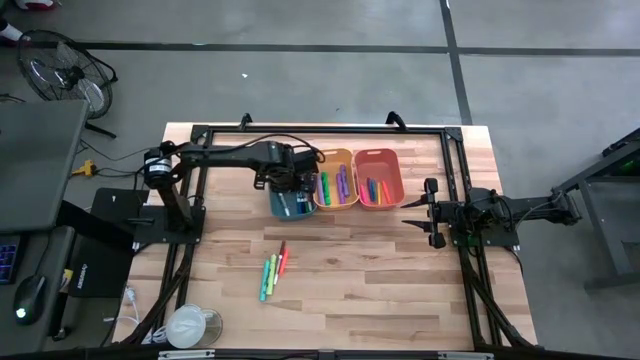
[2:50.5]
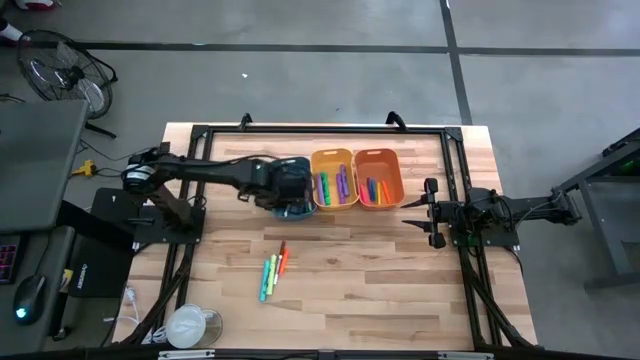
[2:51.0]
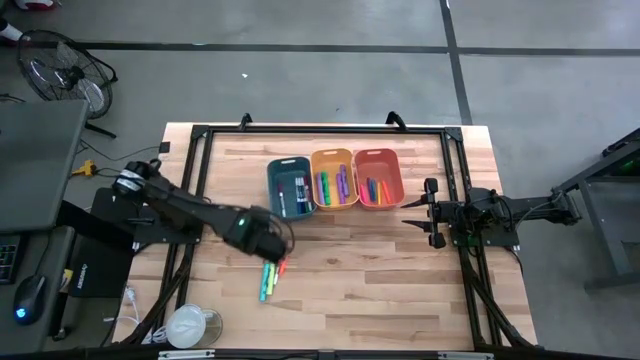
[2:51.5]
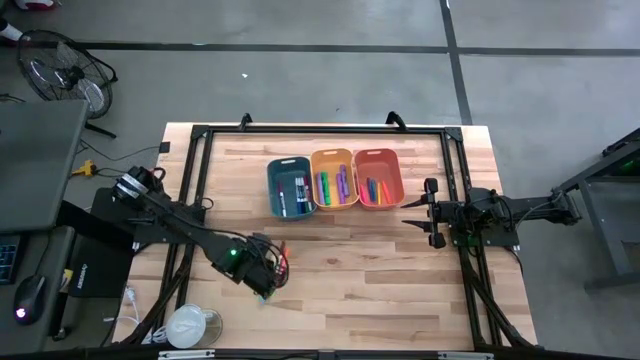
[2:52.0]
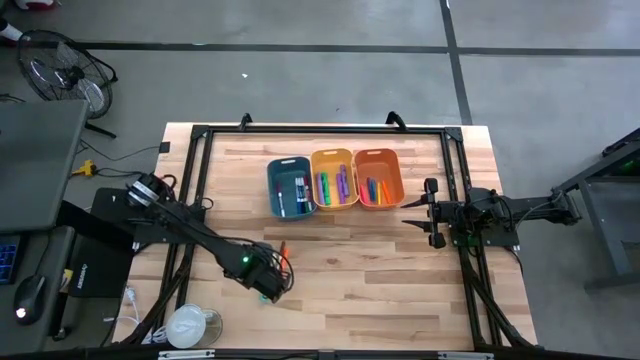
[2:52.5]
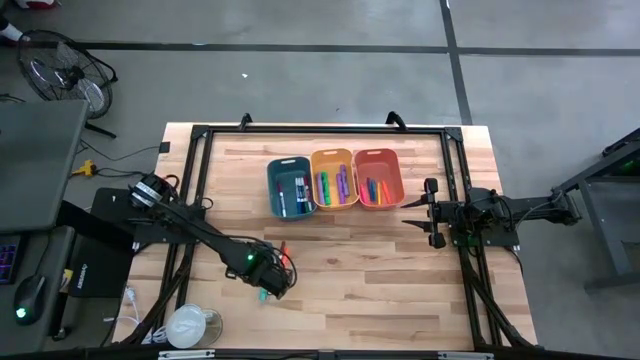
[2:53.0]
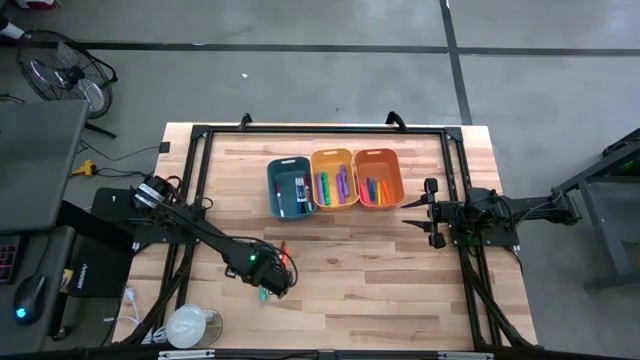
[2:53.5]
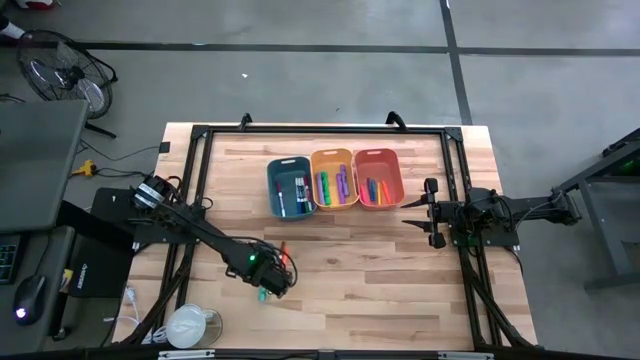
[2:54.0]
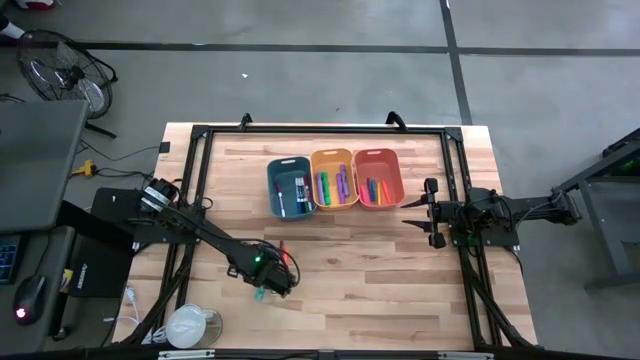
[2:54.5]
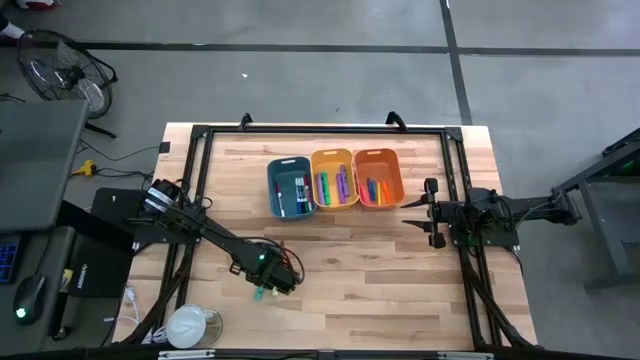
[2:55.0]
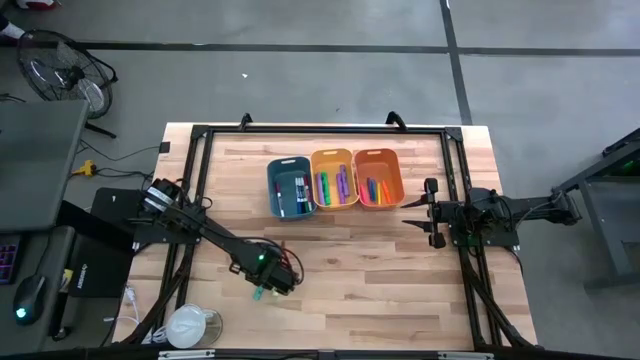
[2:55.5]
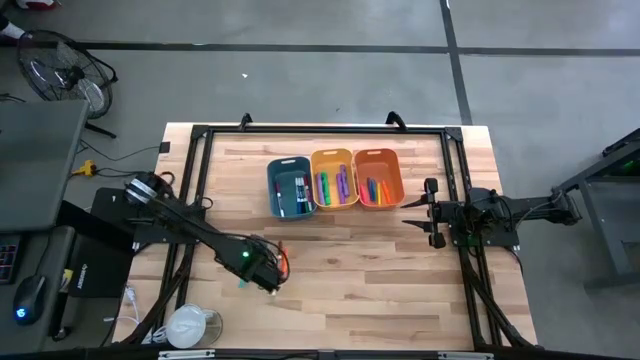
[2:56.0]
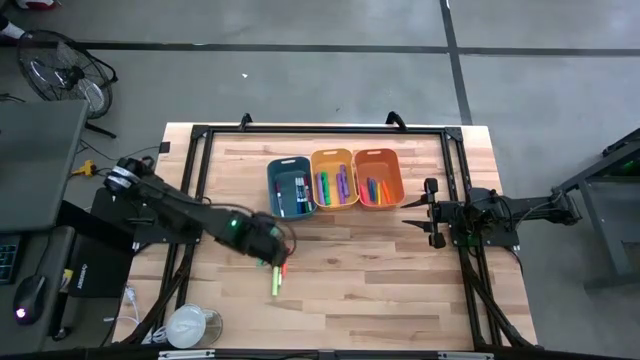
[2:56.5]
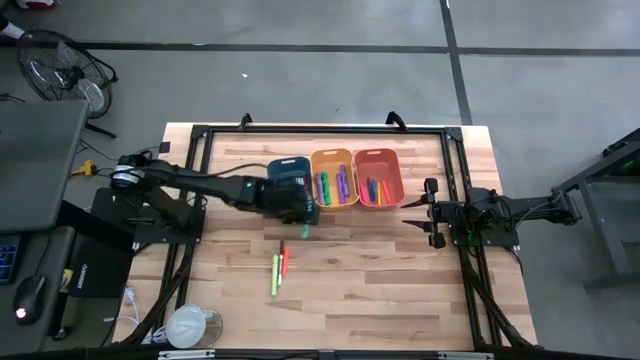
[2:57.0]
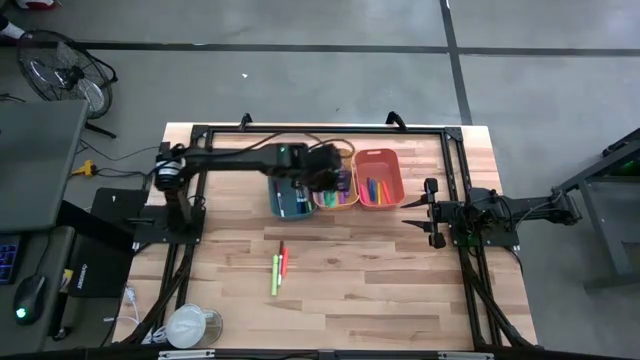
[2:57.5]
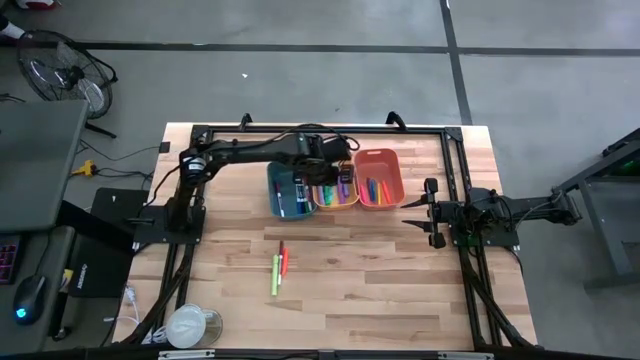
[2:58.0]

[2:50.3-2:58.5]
Task: Pick & Place Markers
Put the blue highlighter pen into the yellow bin

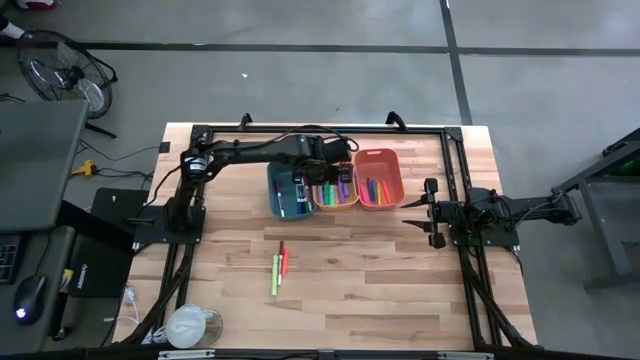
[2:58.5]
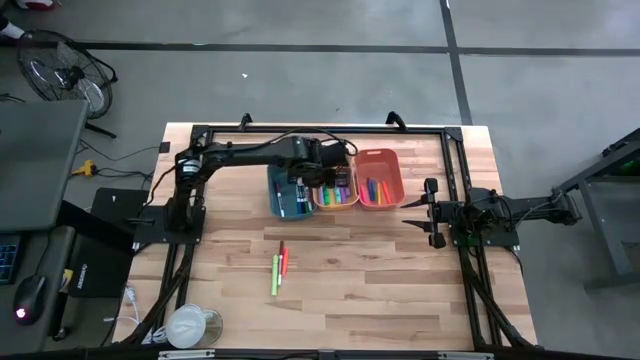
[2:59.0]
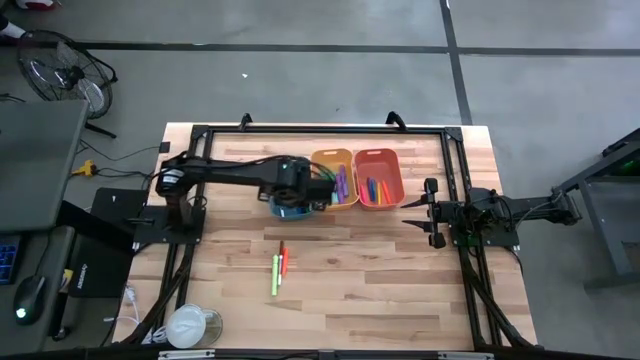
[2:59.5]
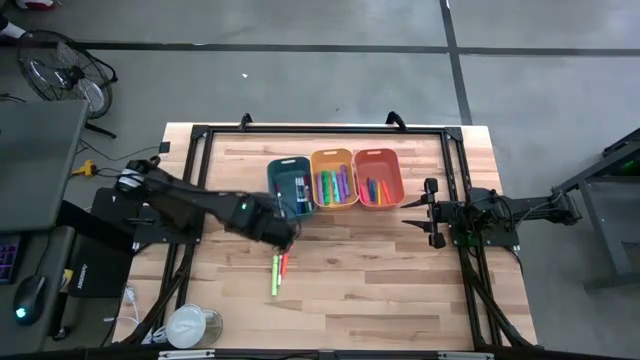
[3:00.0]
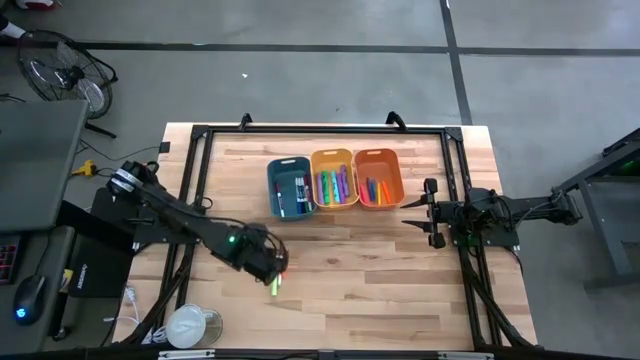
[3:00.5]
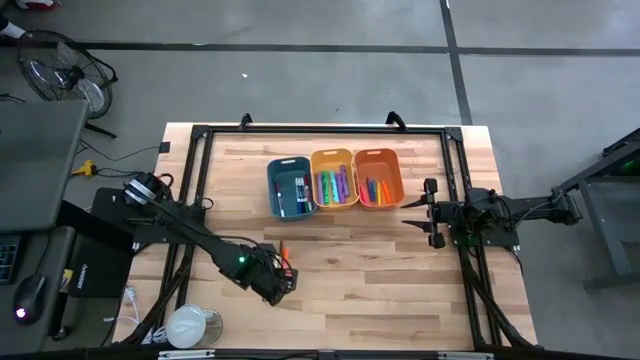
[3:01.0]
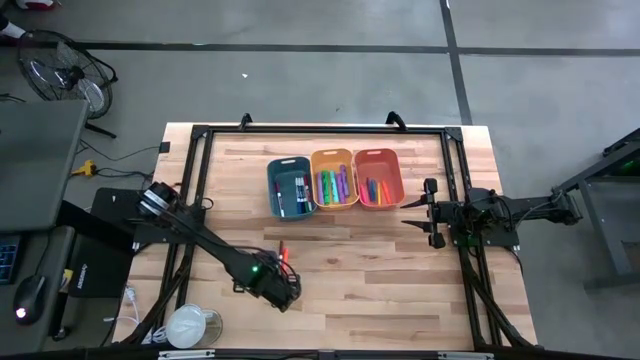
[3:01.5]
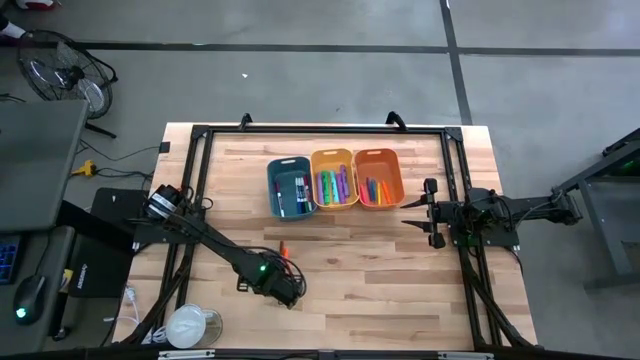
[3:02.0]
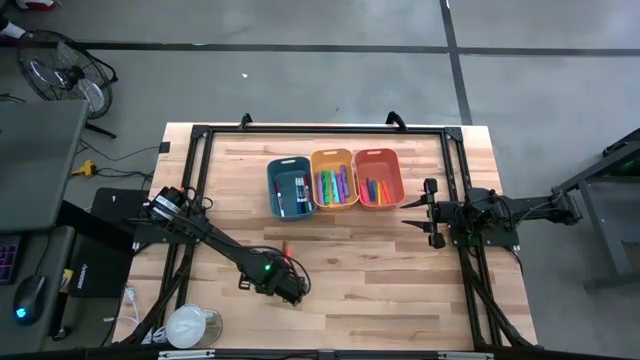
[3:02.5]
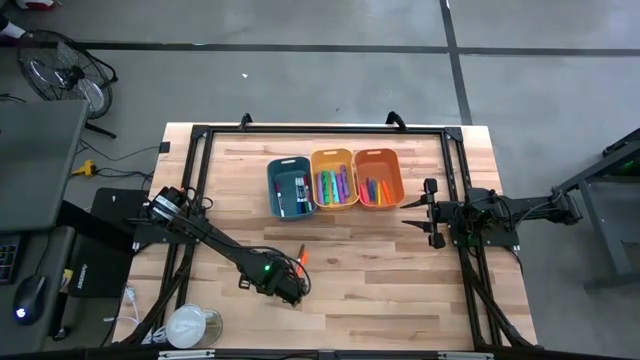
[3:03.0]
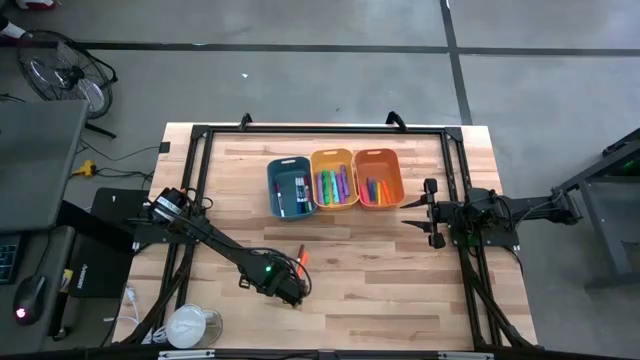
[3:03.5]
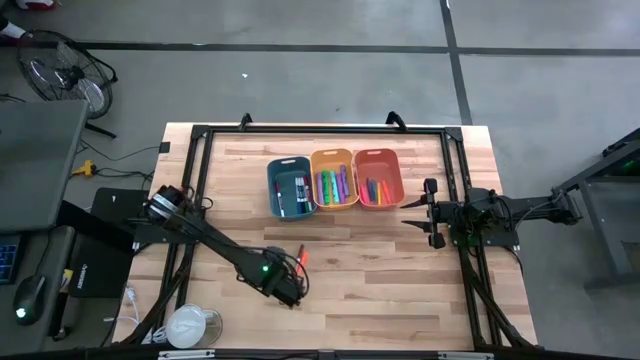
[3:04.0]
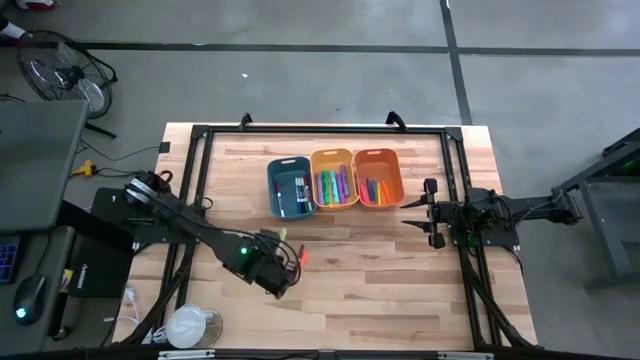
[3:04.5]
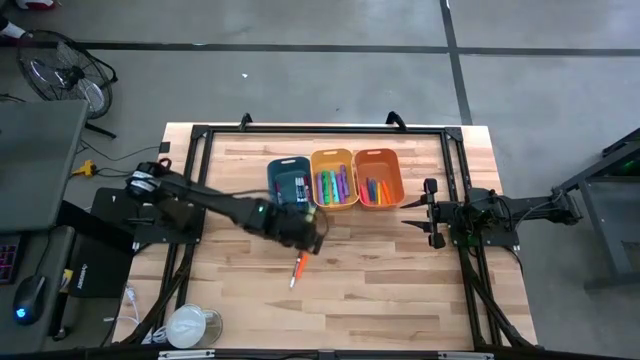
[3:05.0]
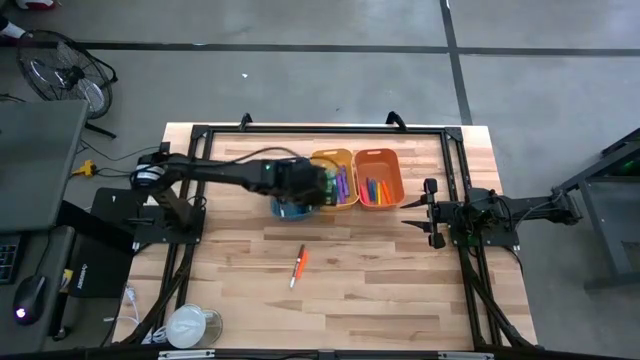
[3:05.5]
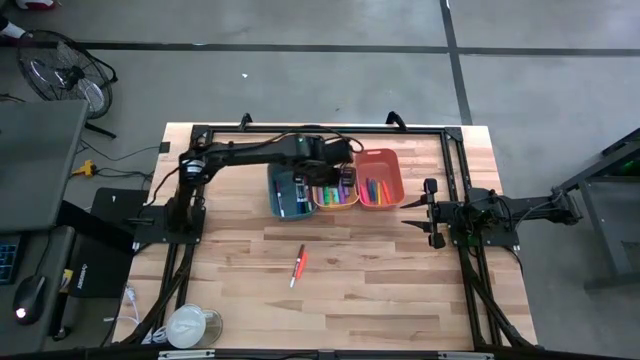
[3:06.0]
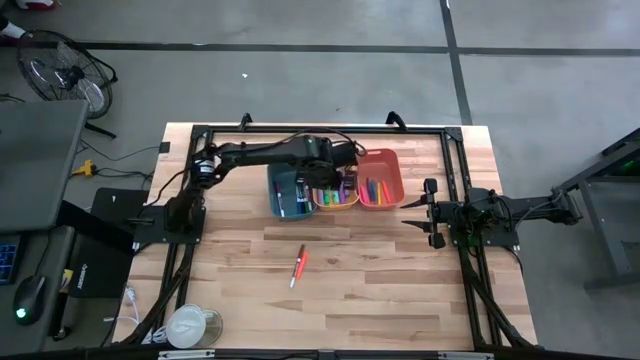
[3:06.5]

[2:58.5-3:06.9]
Put the light green highlighter pen into the yellow bin

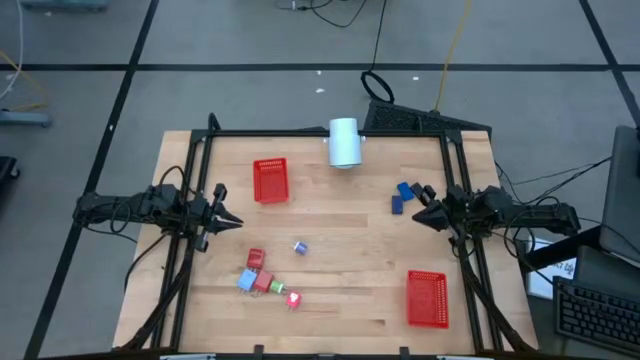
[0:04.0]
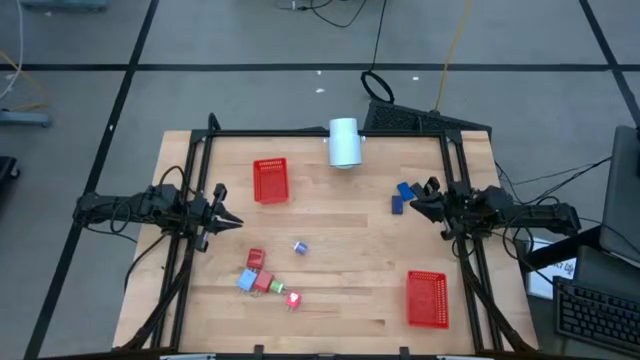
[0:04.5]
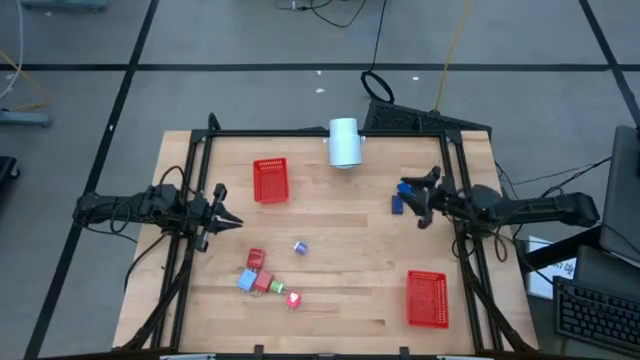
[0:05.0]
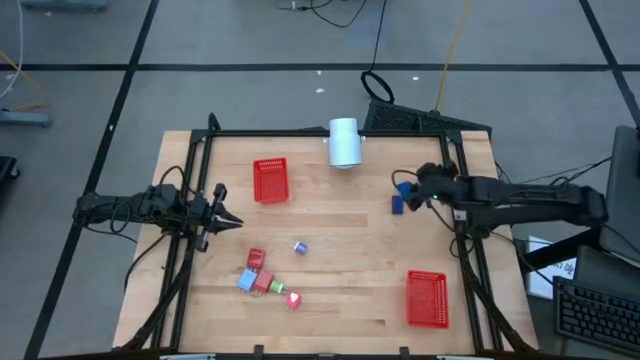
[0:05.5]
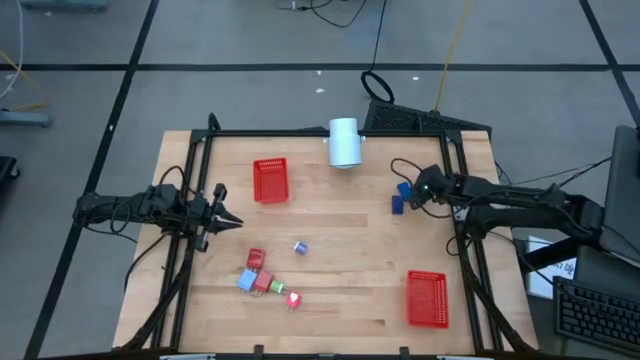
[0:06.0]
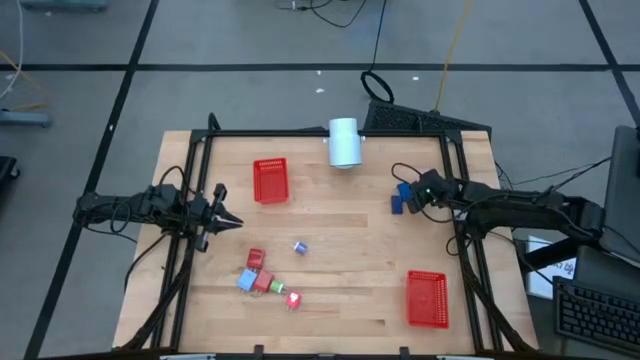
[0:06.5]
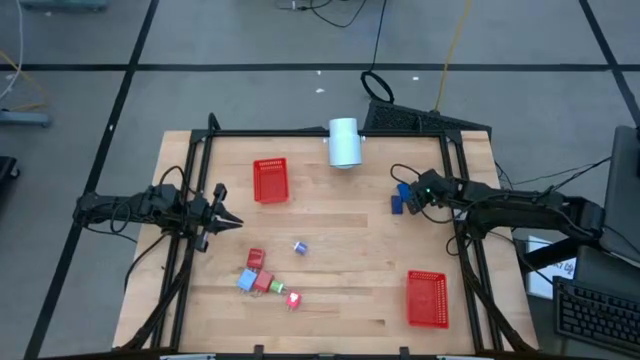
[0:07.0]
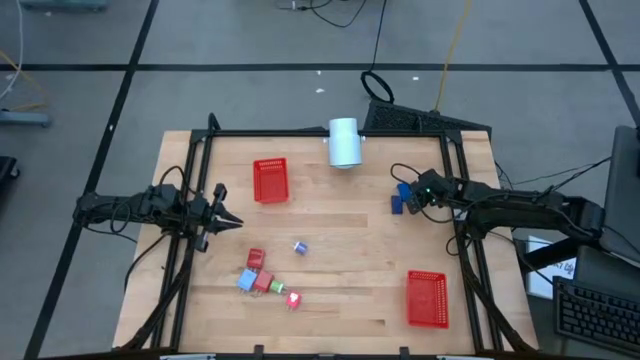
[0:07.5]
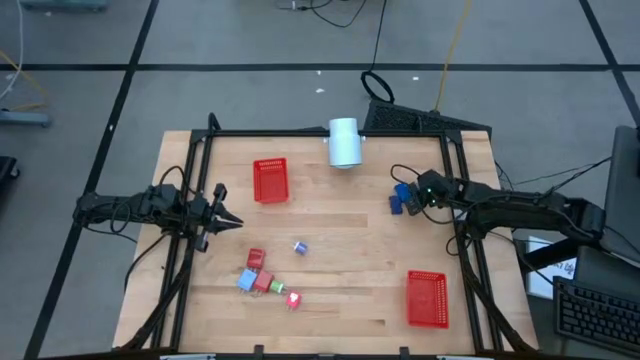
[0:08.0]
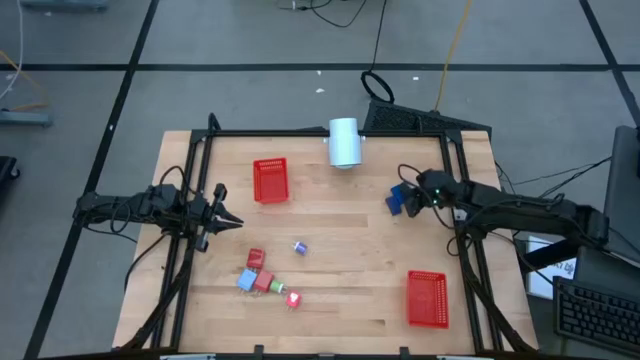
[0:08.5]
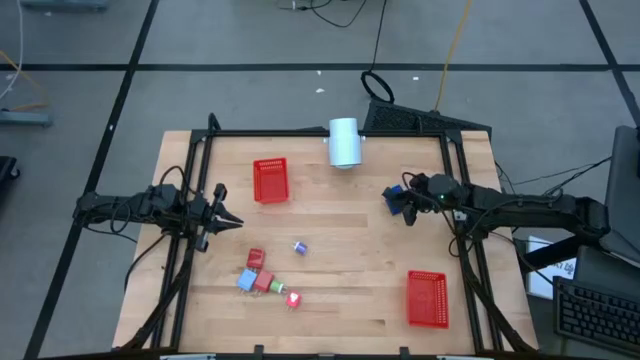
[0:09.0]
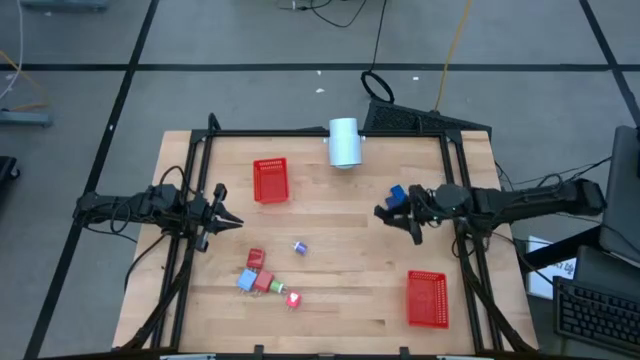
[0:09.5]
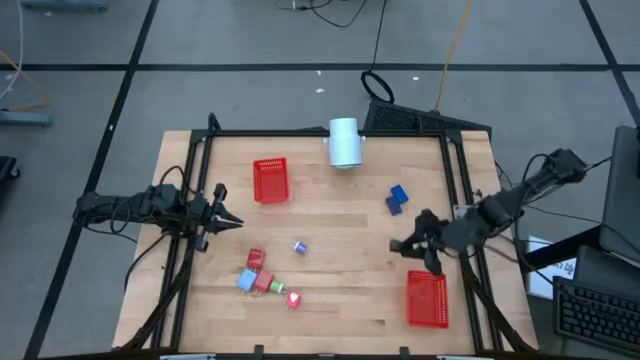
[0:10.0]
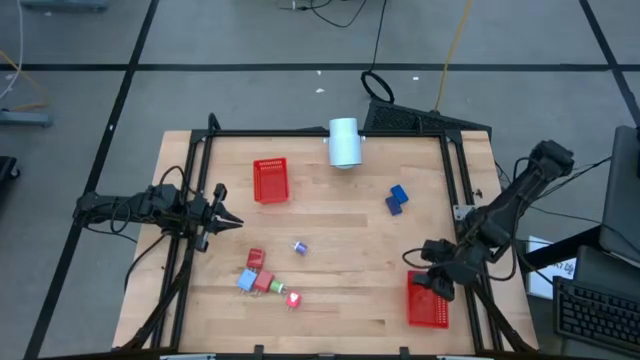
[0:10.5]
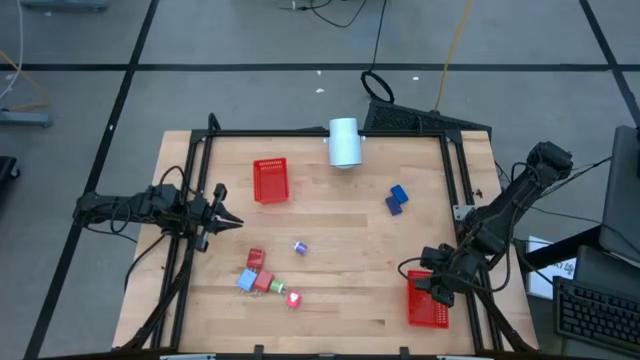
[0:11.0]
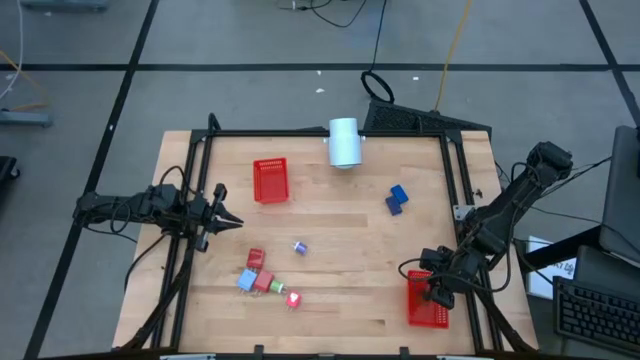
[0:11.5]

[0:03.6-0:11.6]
Task: Pick & Place Office items
Put the black digital timer into the bottom red bin
